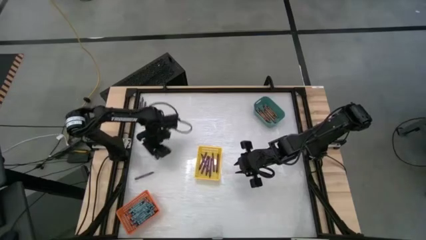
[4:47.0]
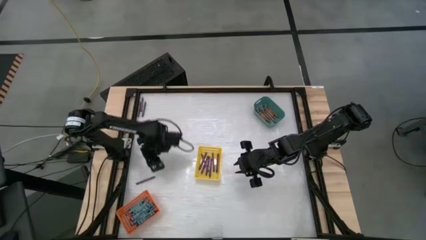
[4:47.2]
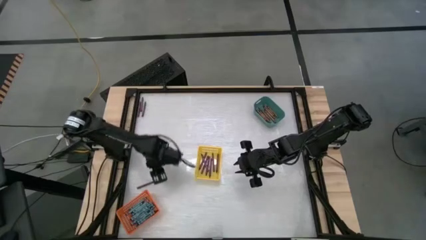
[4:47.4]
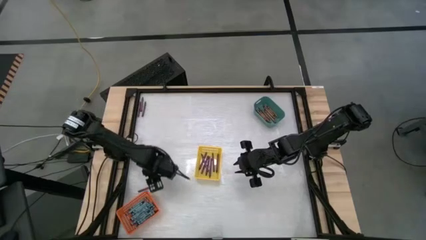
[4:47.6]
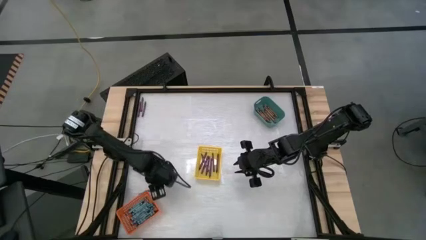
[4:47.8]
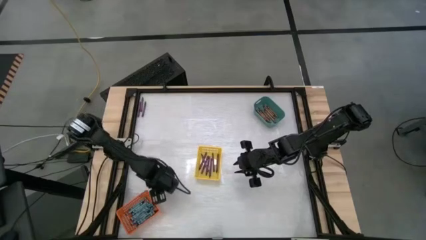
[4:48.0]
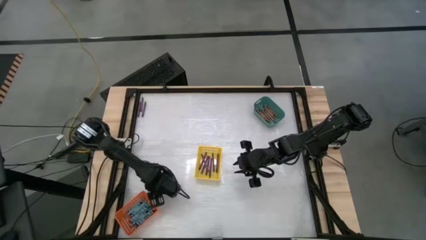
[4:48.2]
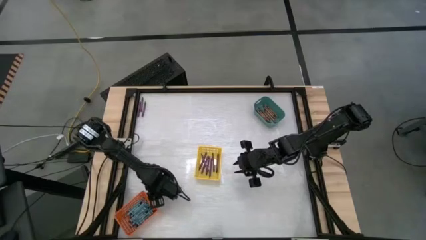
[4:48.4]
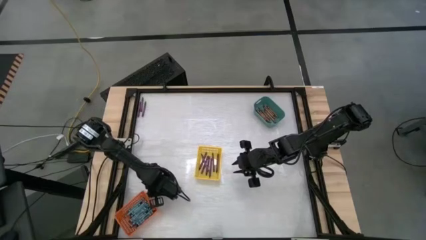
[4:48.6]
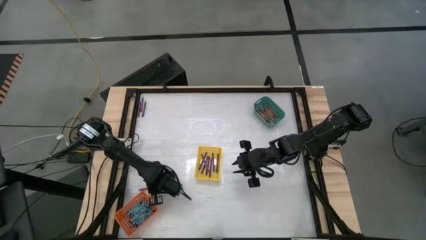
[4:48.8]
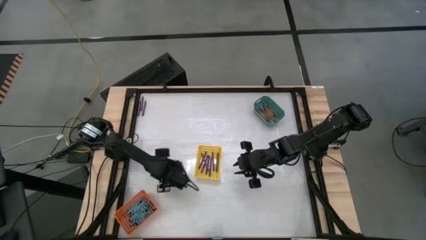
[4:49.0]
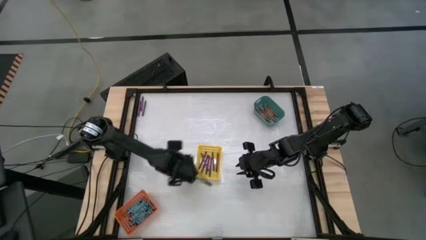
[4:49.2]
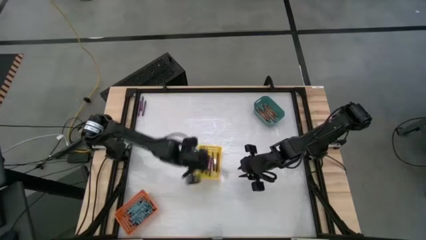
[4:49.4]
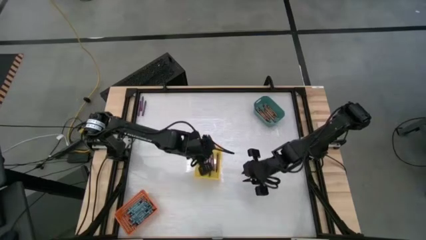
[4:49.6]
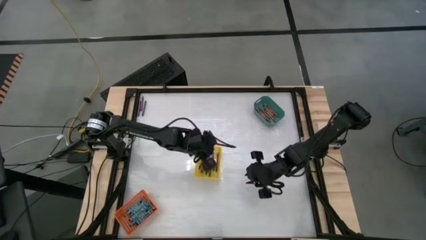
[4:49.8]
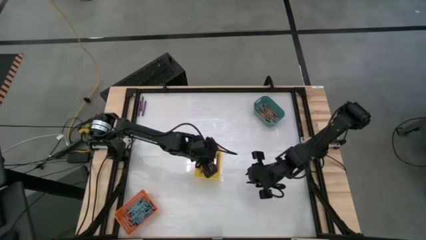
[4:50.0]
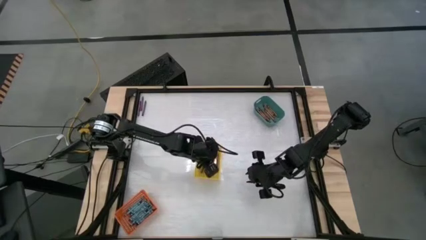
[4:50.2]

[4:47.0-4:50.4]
Task: Sort crayons
Put the violet crayon into the yellow basket

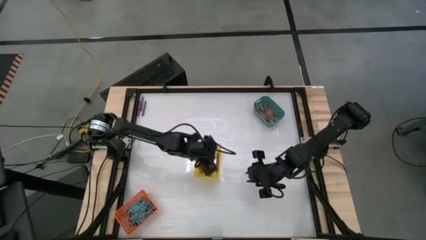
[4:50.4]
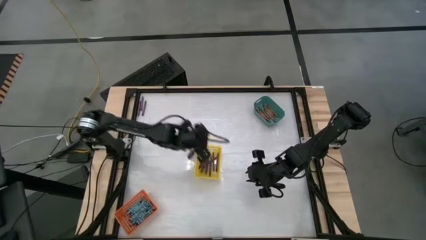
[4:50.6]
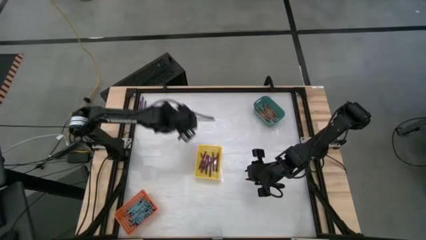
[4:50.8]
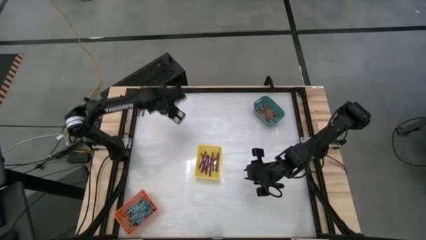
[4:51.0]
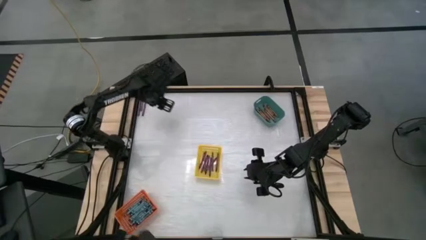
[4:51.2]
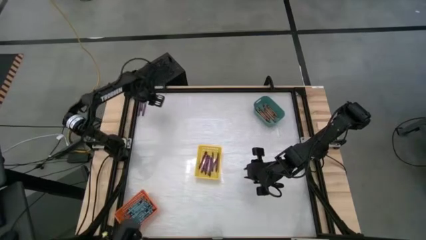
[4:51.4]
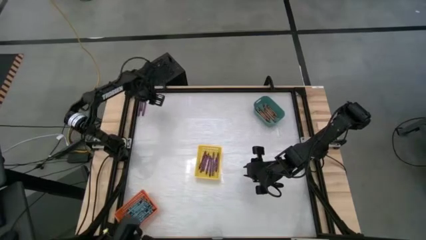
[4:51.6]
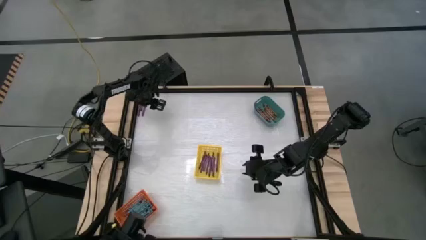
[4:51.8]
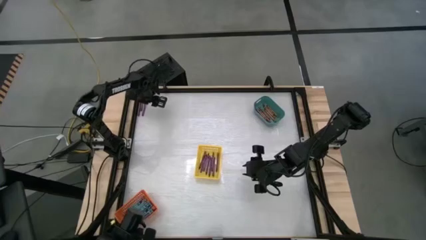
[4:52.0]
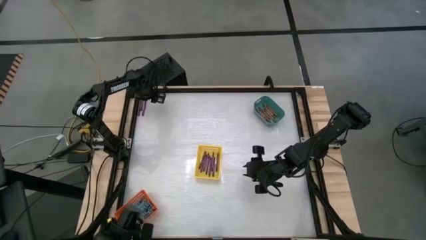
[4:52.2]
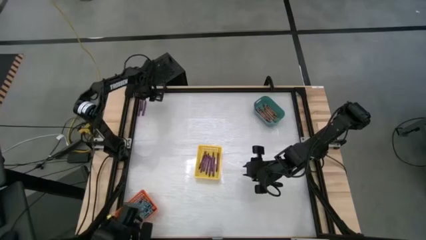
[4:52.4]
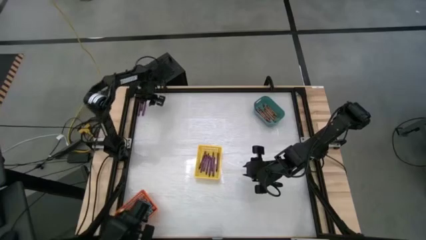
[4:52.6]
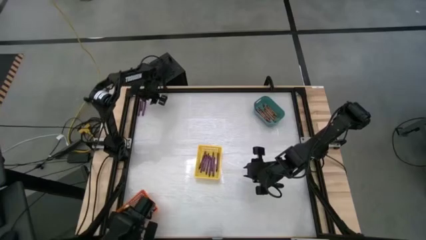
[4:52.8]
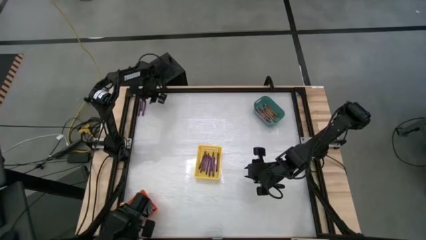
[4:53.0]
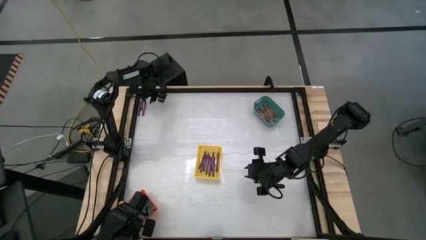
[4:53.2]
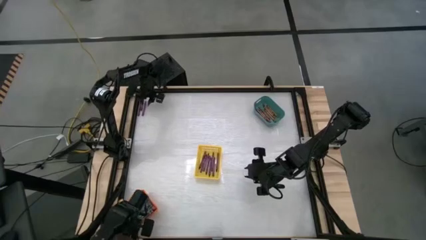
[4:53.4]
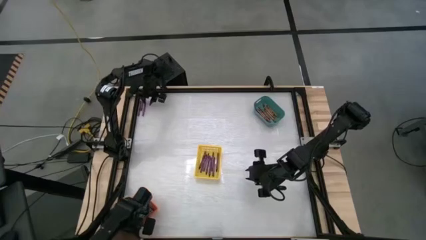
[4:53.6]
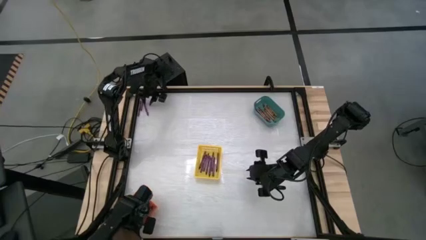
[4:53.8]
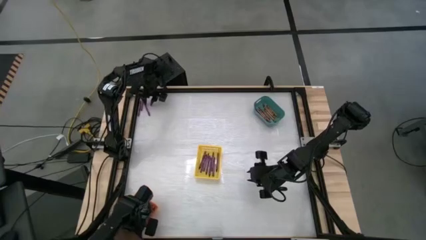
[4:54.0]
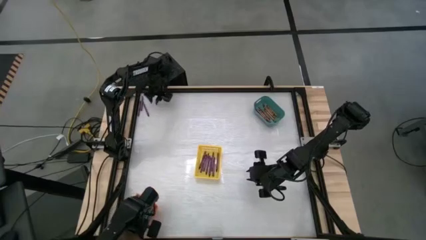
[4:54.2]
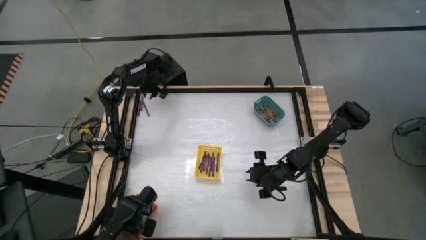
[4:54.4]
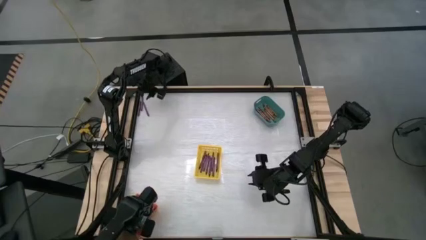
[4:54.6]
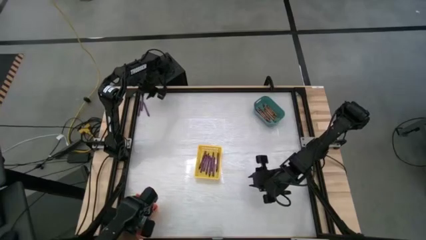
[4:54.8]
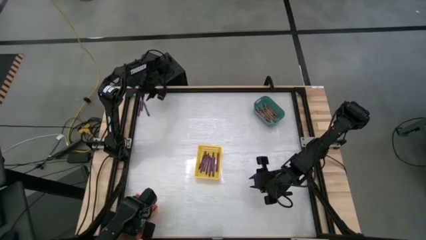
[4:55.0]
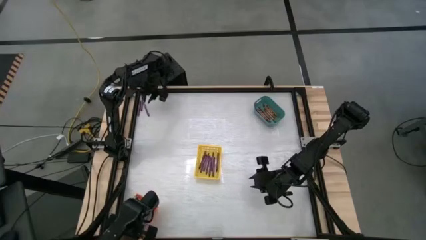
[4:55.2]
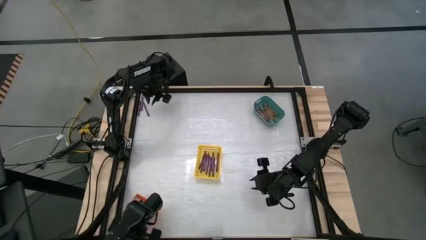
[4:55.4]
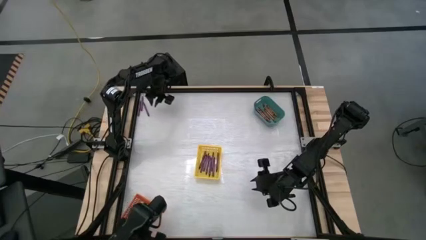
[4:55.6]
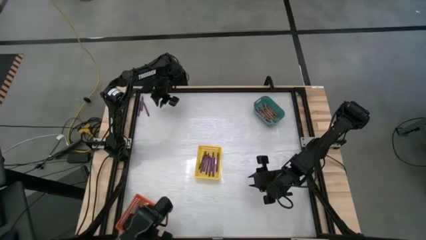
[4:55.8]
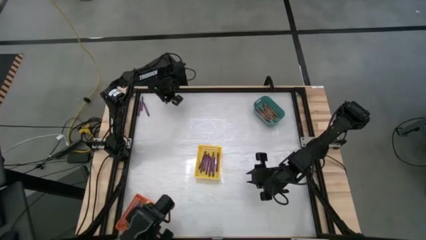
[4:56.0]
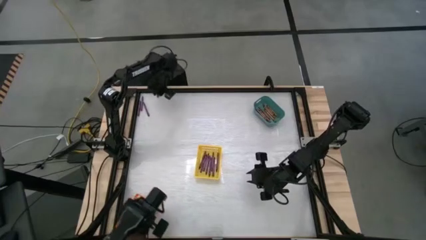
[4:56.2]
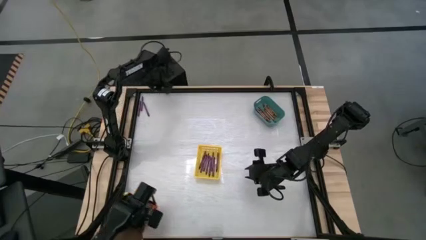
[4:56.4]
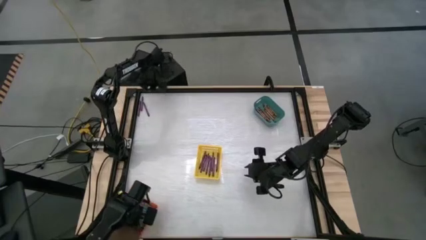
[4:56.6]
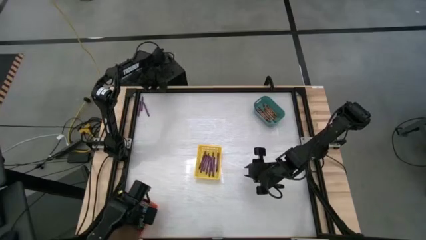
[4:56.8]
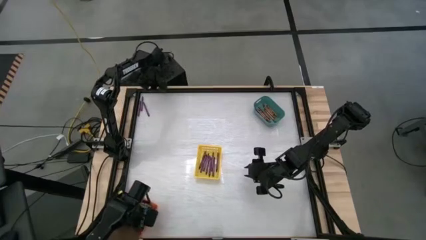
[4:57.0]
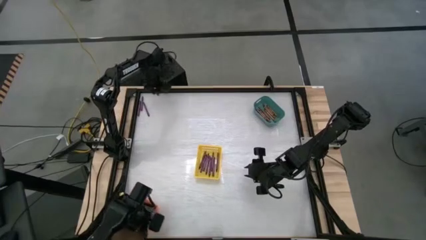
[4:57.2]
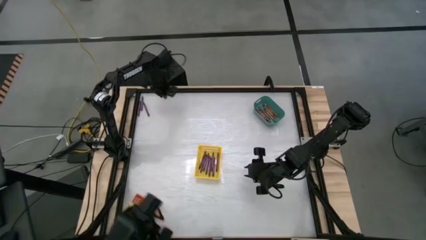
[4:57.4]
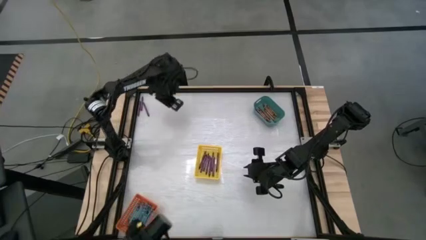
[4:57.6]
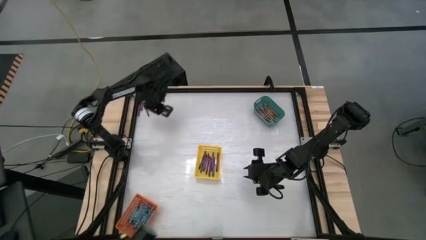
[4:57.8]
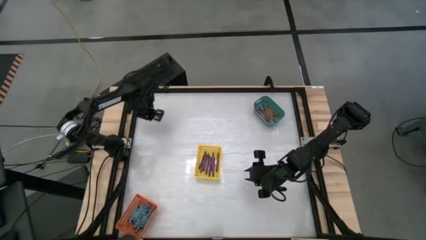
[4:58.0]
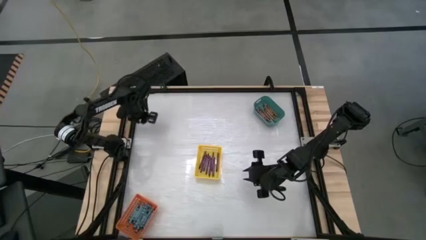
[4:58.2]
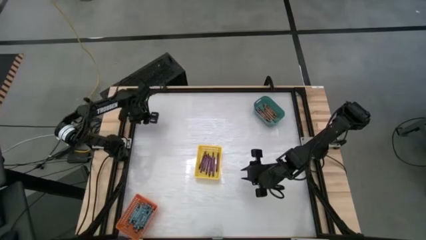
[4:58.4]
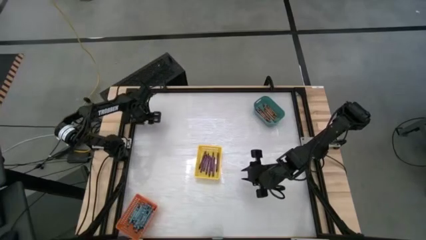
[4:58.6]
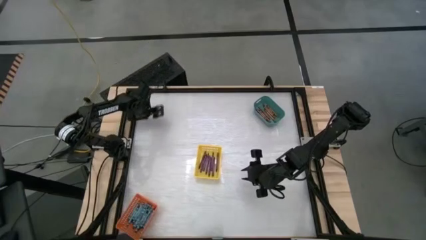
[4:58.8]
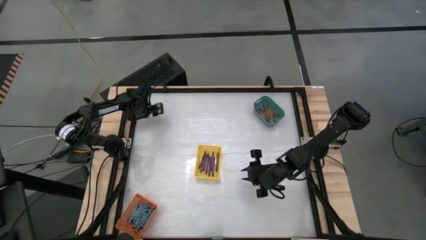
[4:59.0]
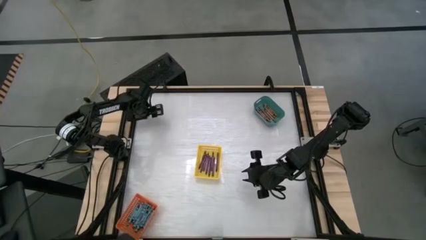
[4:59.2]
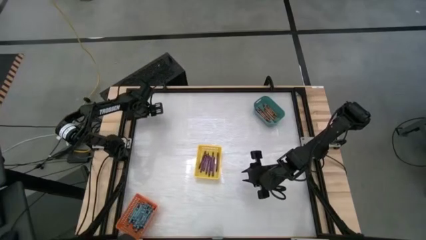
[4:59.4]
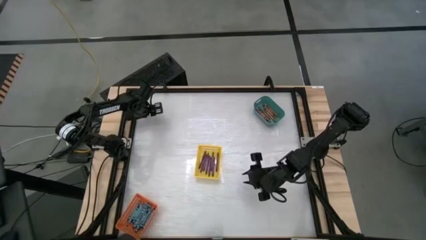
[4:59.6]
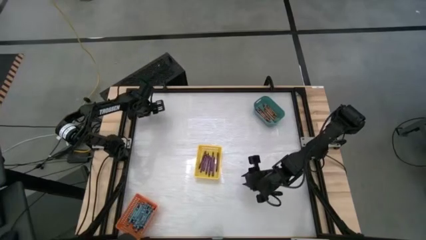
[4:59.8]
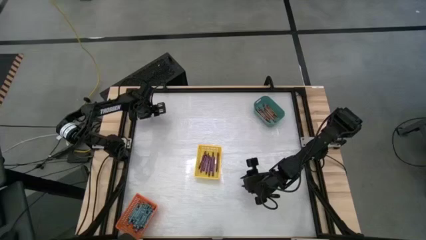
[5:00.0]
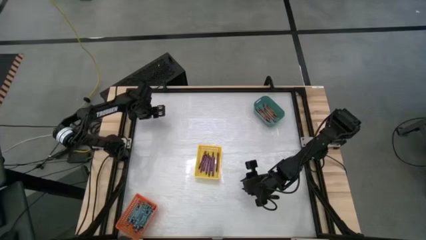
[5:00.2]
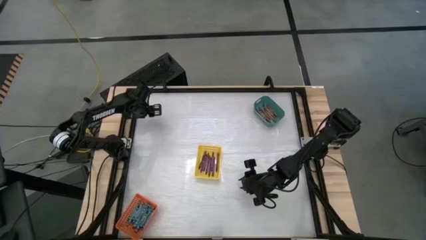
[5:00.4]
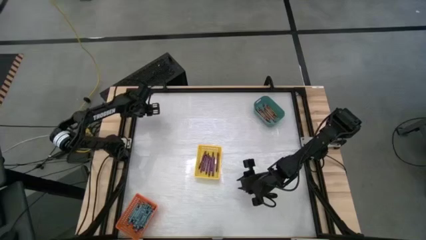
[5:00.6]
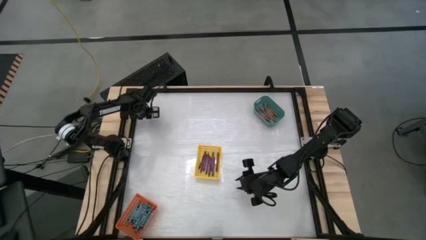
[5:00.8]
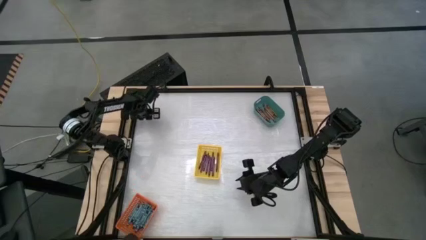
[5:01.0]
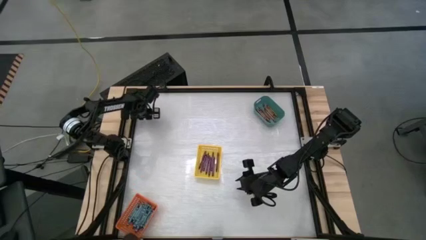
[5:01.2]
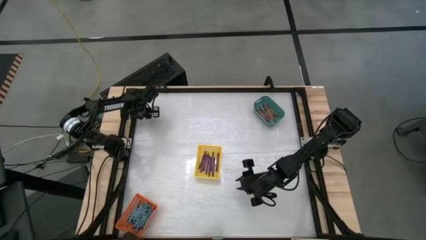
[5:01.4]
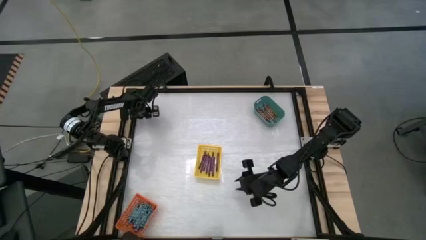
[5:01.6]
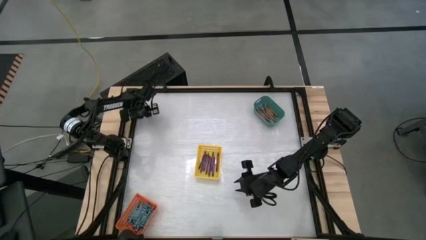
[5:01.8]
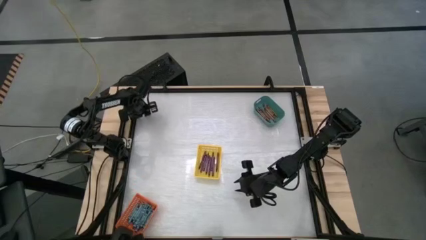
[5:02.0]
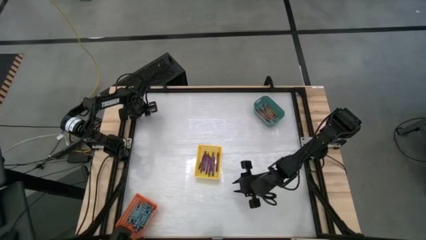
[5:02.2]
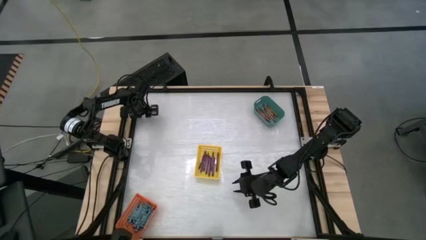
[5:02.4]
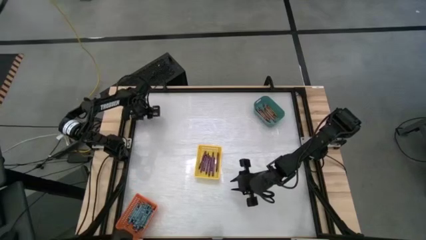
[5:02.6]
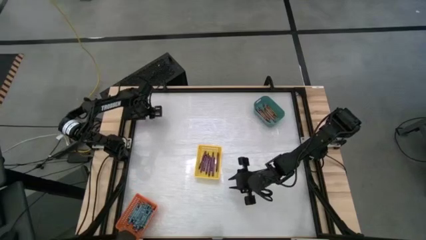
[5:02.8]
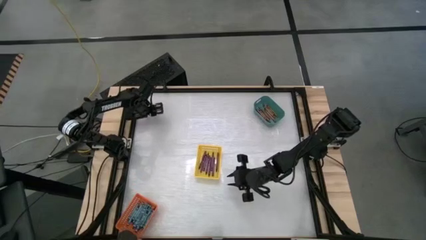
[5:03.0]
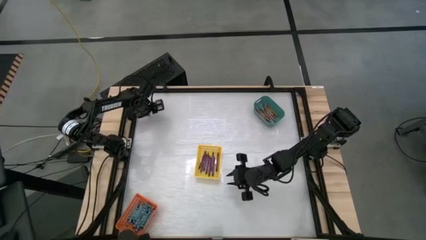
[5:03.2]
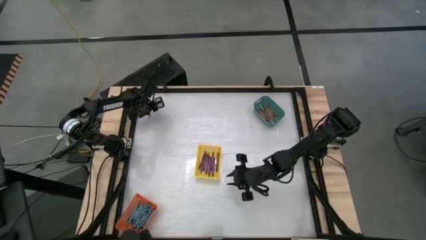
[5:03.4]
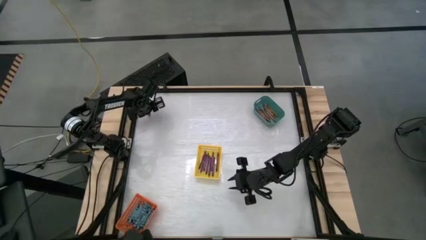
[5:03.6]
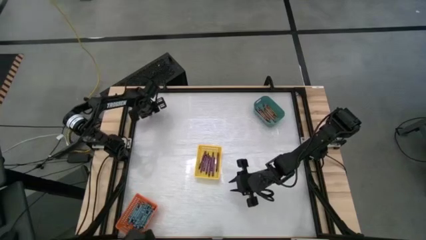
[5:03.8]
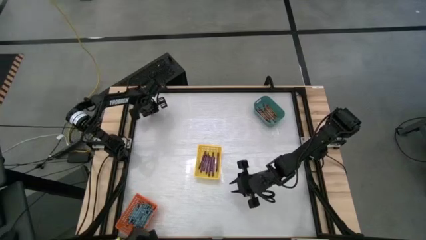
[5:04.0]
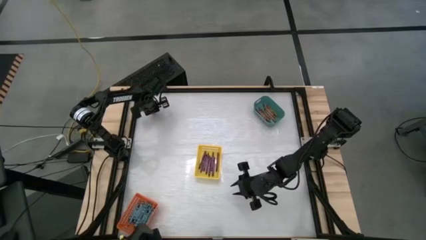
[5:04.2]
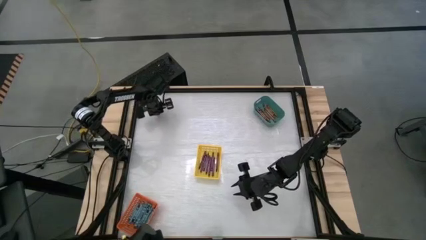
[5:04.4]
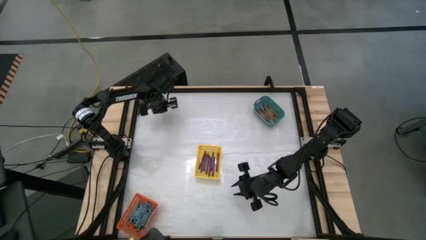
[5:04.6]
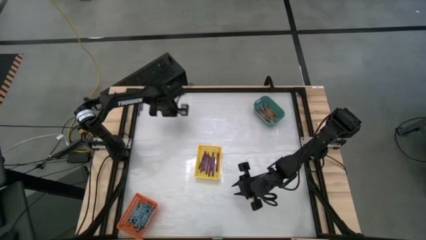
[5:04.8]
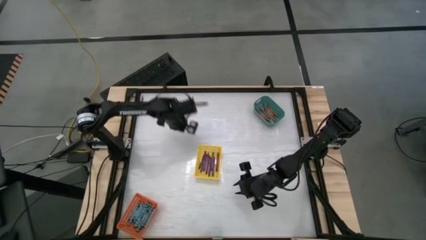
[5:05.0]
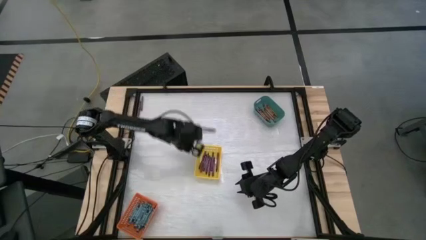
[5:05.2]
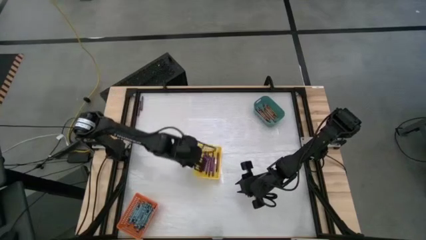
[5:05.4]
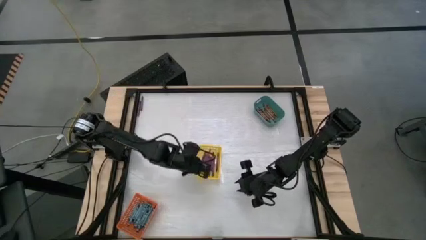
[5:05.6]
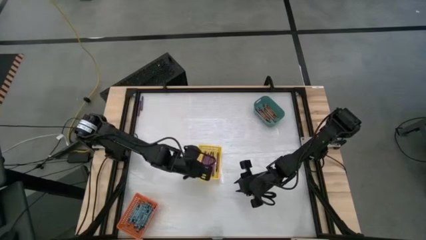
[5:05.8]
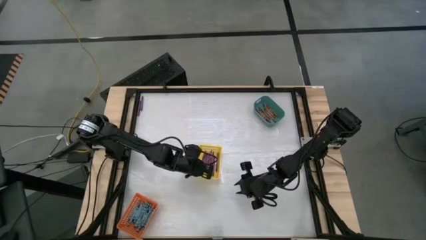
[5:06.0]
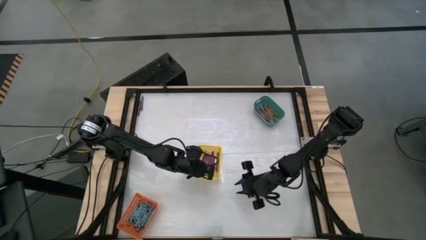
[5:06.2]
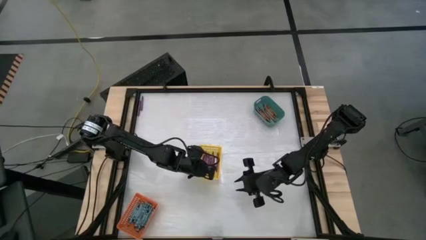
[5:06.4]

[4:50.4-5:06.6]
Put the violet crayon into the yellow basket
